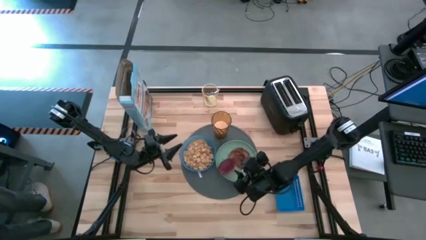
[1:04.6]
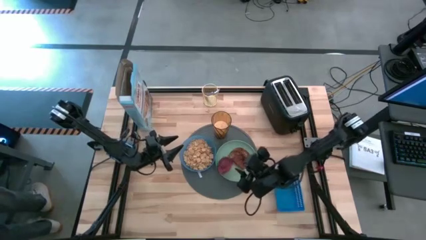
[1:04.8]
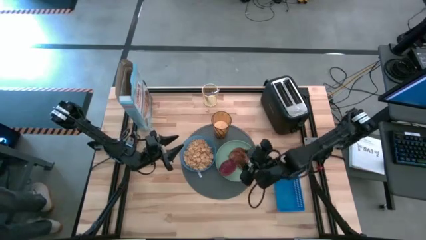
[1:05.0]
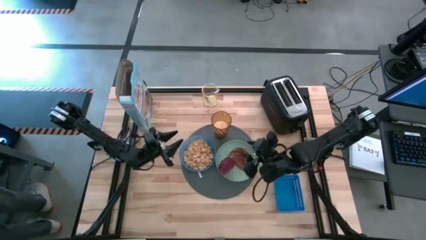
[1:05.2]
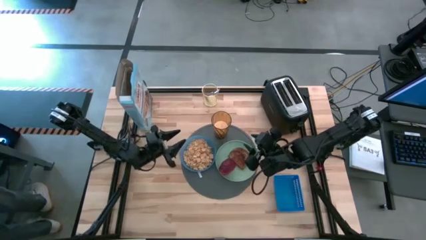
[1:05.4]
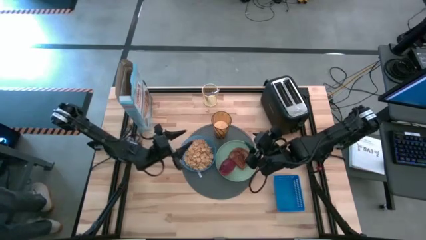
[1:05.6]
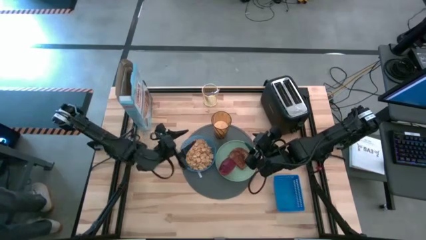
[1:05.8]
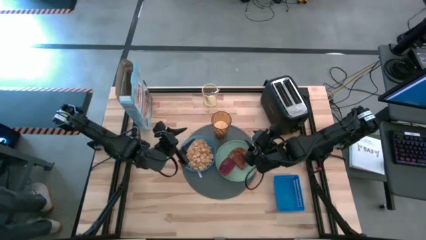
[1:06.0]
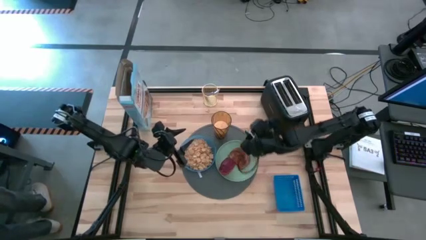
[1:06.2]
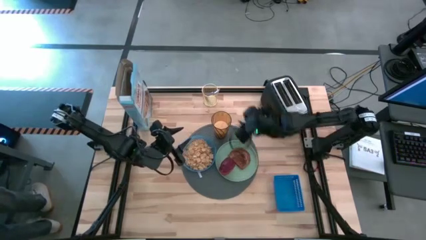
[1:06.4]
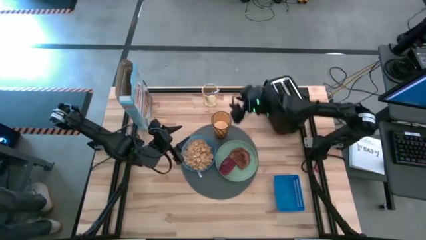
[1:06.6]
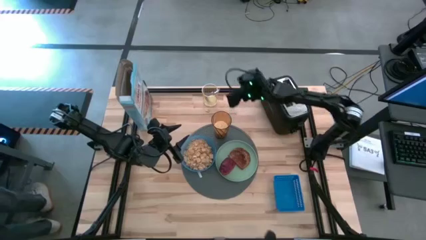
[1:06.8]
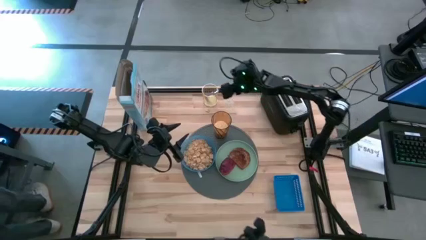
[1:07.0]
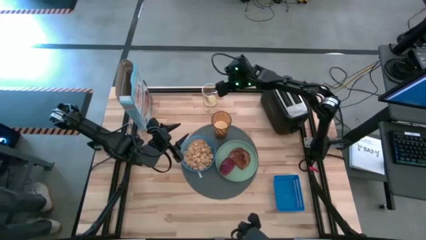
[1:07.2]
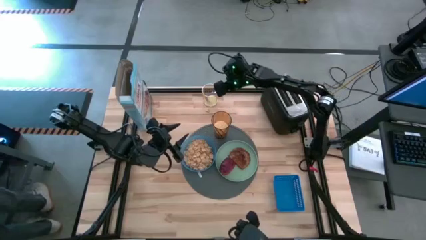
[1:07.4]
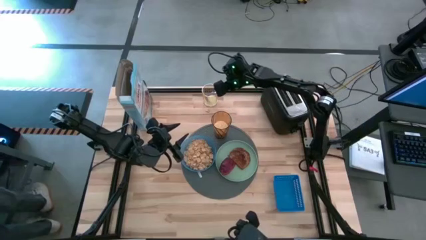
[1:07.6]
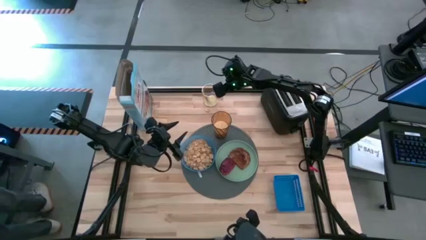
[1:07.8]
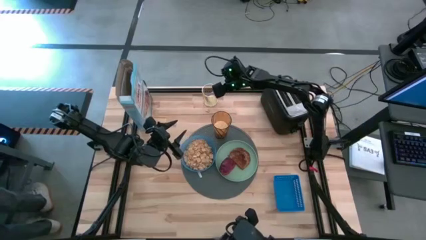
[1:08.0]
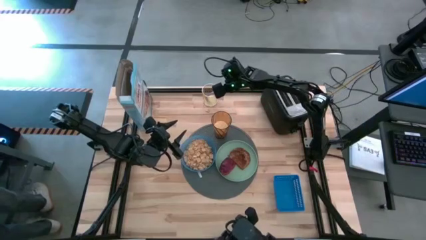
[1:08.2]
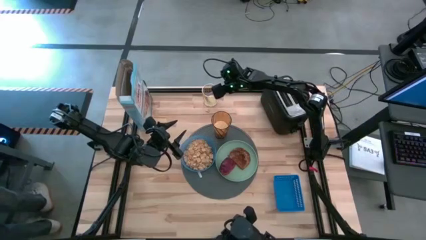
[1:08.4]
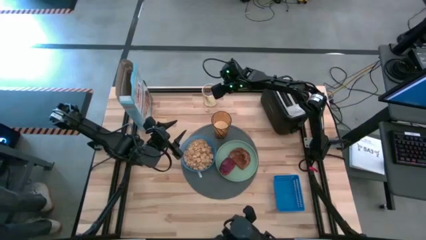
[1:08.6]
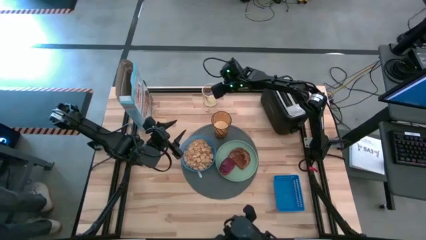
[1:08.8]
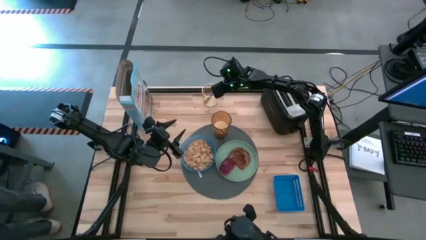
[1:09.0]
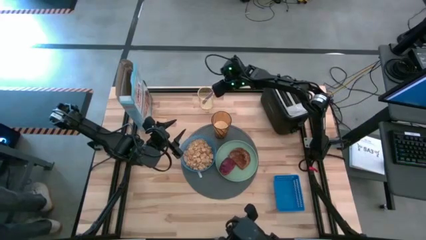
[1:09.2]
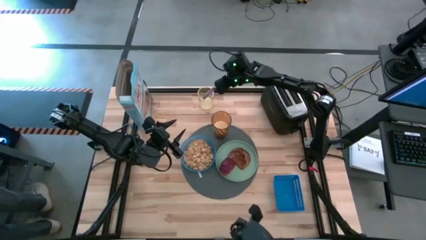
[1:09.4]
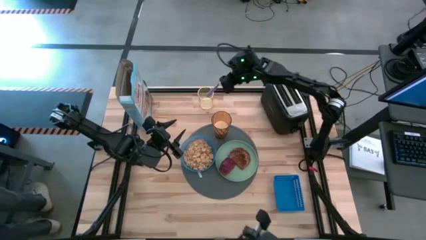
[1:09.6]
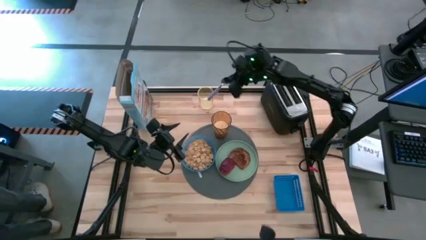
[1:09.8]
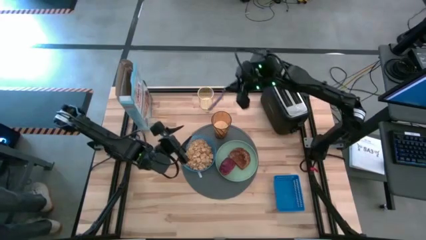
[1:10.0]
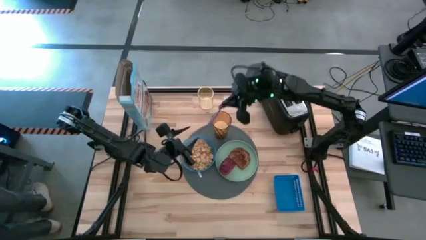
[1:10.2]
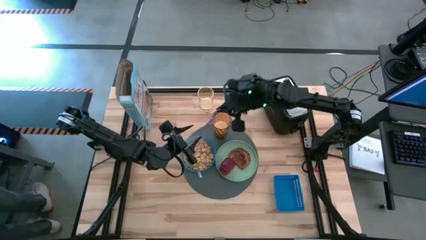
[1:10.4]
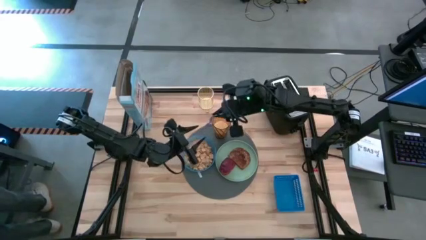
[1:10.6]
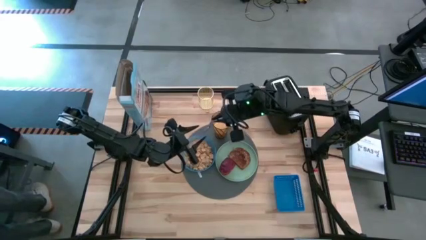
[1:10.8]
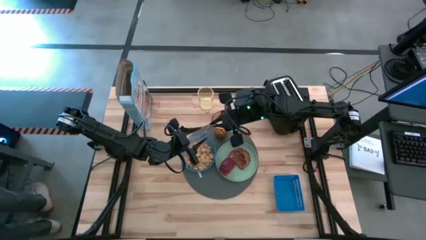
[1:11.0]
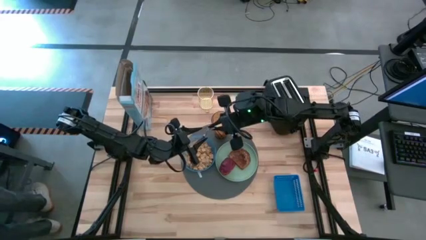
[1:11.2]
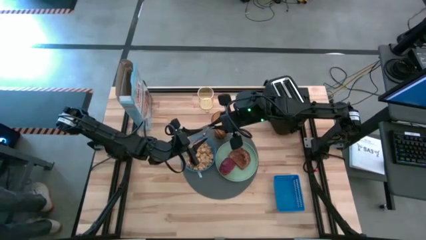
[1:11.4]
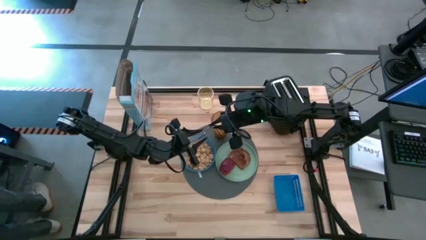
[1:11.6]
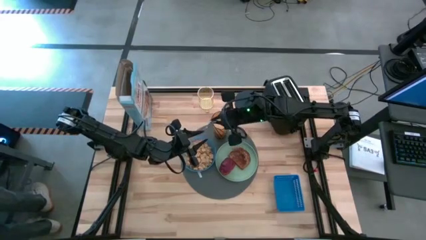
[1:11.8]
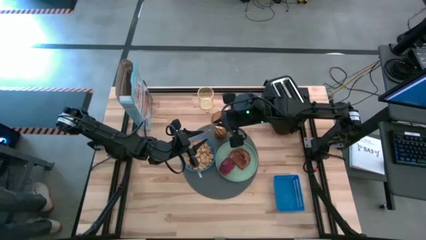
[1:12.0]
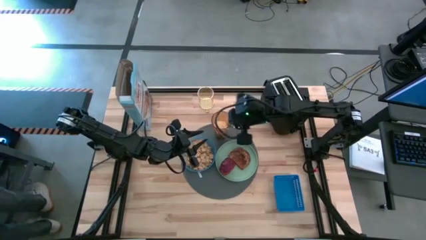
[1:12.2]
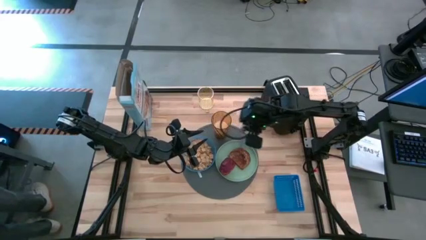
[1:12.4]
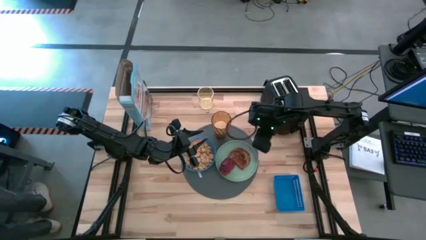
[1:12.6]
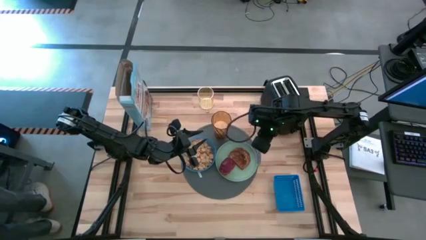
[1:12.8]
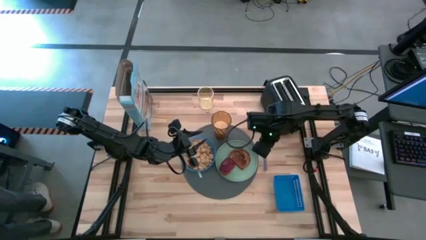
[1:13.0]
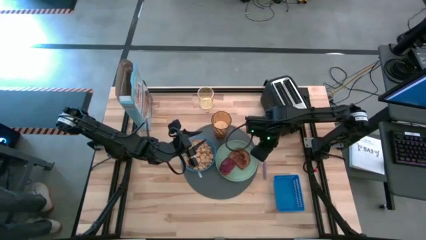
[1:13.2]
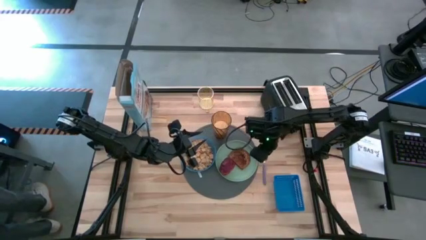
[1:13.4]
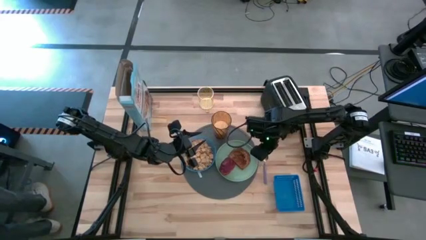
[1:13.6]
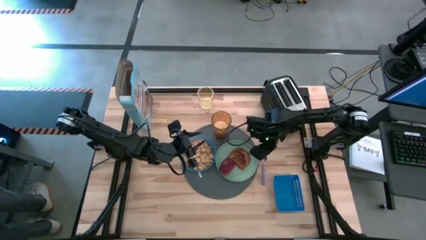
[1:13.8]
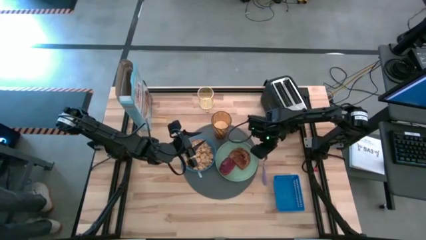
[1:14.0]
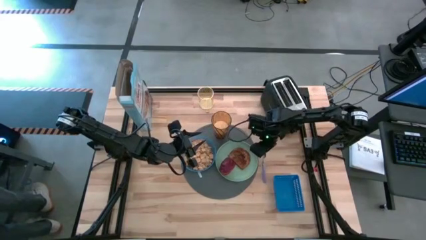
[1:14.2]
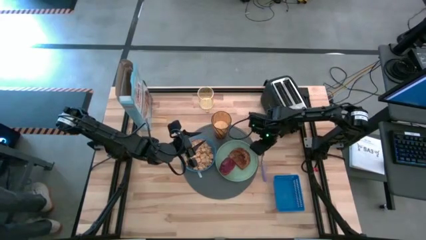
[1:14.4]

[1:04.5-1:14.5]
Task: Arrange a breakfast setting
Put the violet spoon on the table to the right side of the green plate

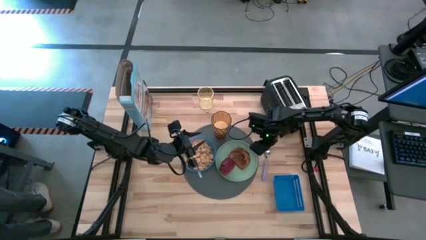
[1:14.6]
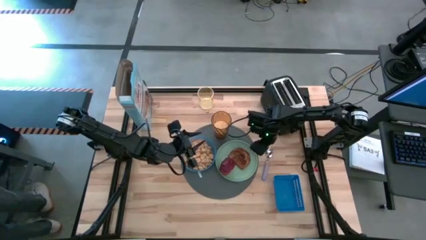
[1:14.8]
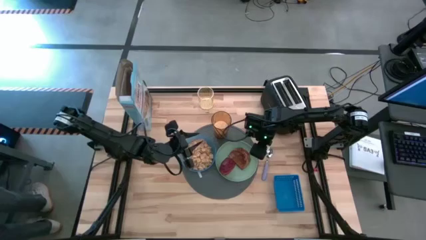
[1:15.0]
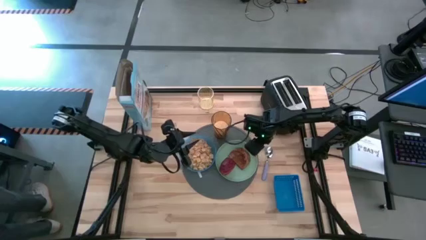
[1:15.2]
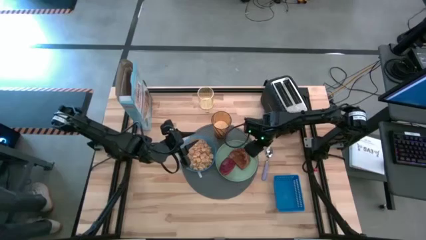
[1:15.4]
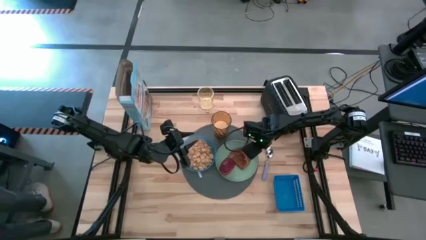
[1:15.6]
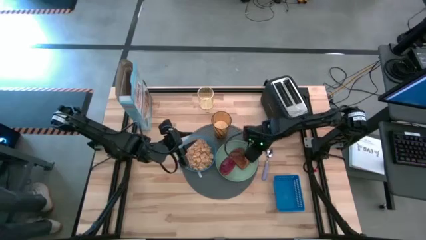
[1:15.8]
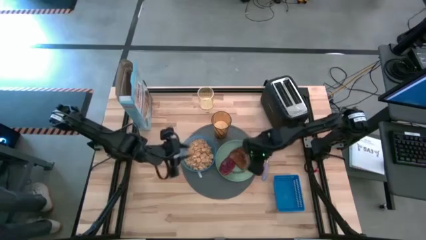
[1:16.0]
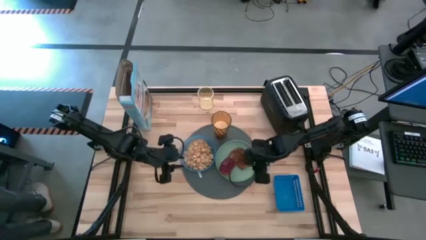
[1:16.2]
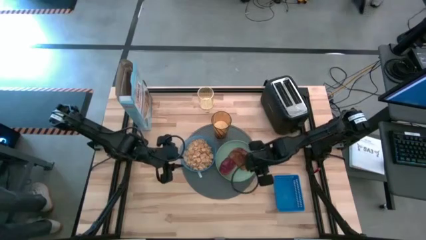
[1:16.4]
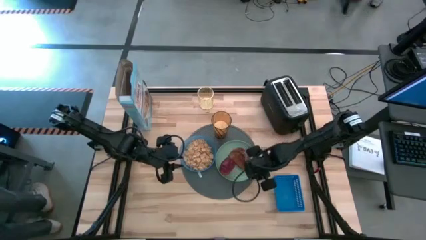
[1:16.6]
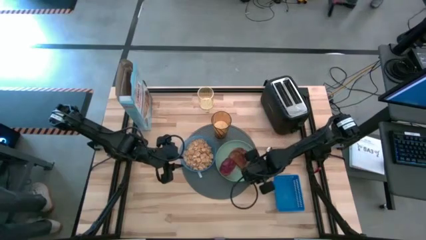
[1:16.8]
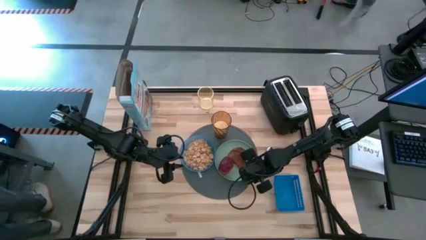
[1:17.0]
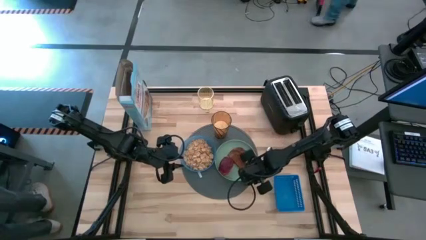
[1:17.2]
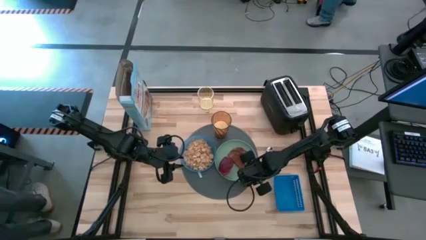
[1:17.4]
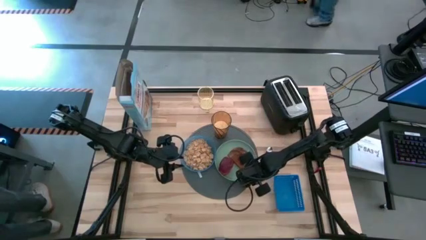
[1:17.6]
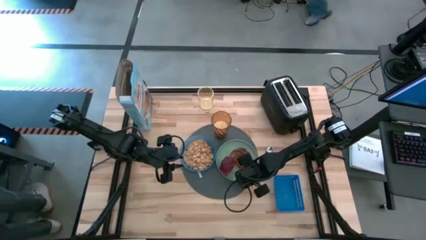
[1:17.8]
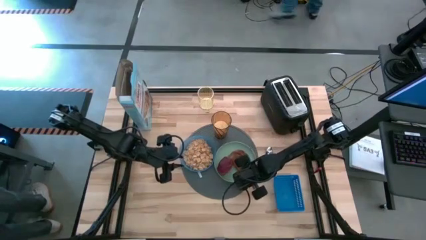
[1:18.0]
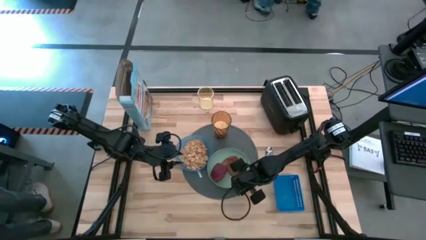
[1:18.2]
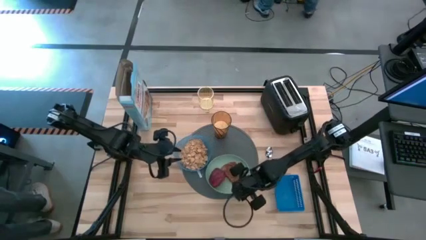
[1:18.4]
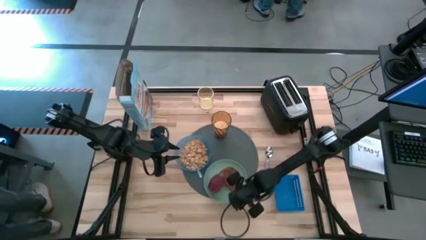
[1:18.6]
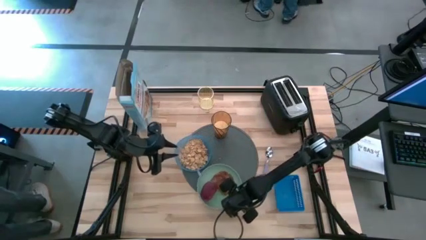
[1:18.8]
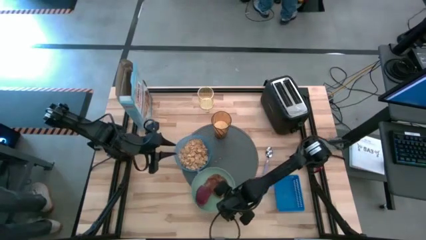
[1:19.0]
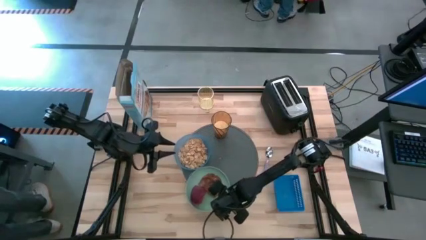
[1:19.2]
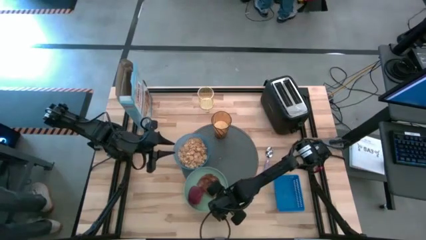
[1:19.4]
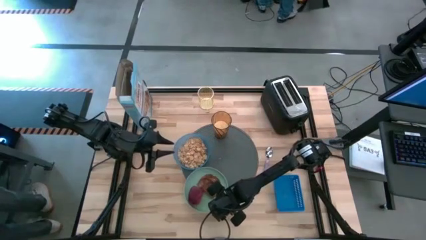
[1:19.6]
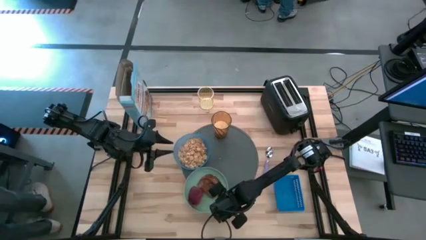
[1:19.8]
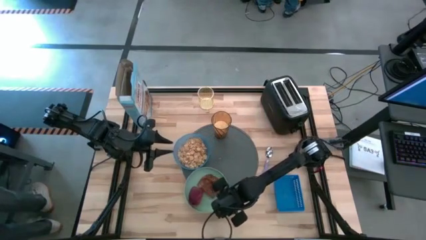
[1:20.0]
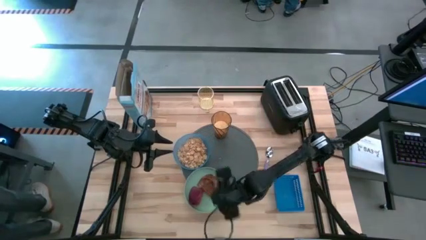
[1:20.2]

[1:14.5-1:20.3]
Move the green plate to the bottom side of the table mat

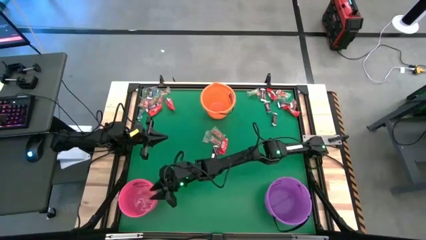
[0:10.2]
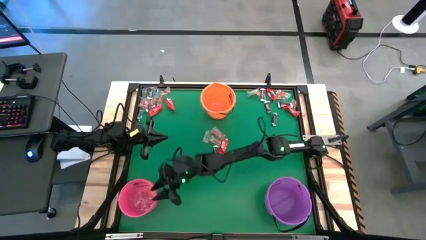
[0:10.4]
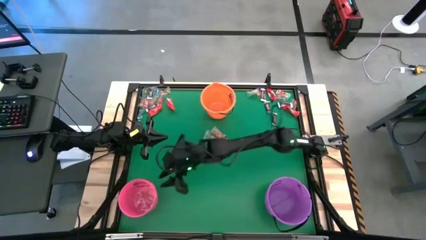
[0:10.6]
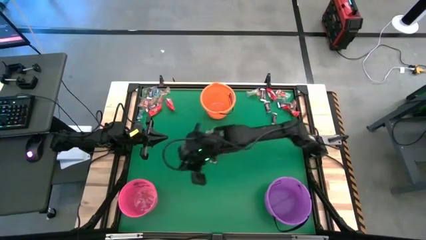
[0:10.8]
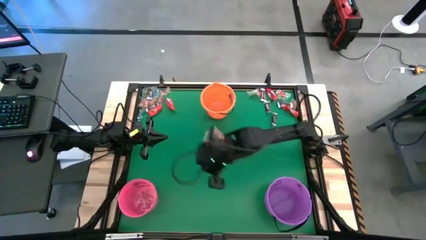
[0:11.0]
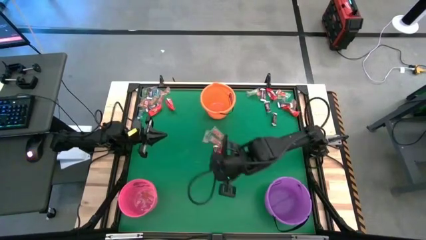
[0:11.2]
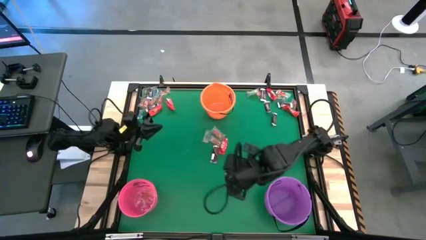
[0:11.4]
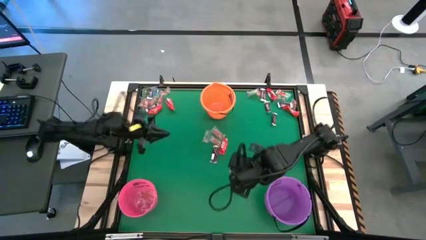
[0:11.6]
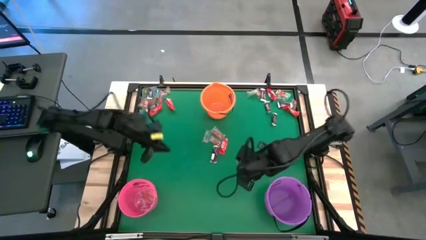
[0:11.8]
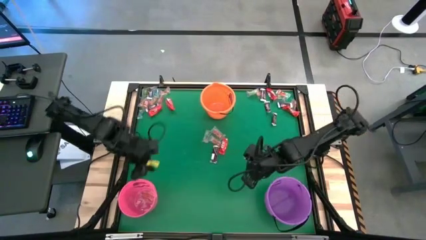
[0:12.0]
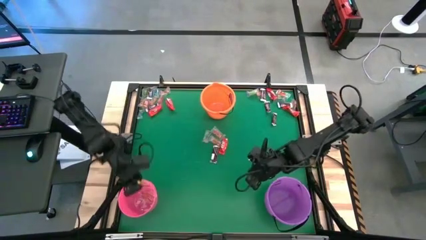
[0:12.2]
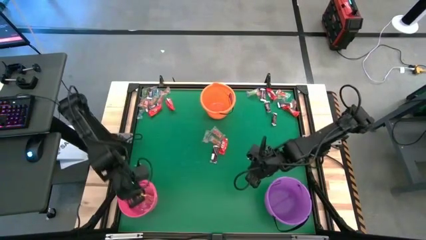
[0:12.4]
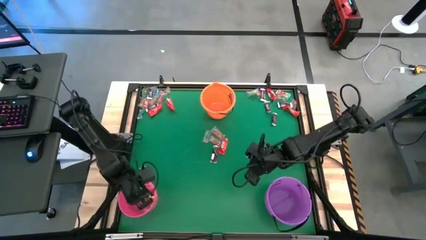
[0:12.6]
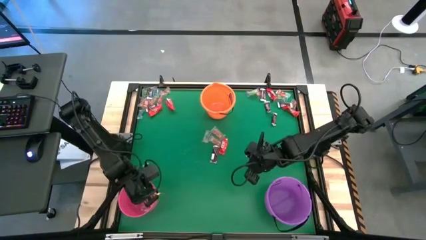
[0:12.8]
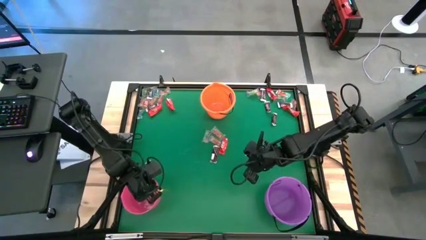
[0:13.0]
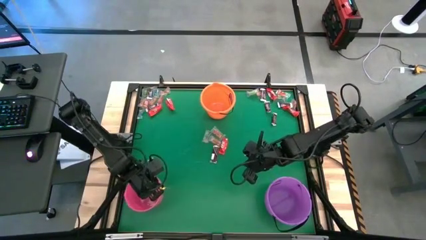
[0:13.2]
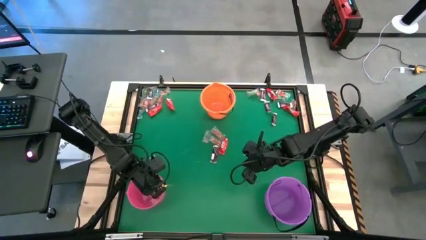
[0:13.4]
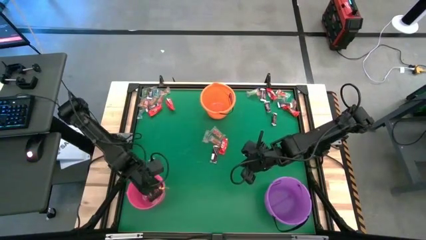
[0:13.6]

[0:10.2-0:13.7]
Task: Sort candy by brand, put in halloween buckets
Adjust the pink bucket
